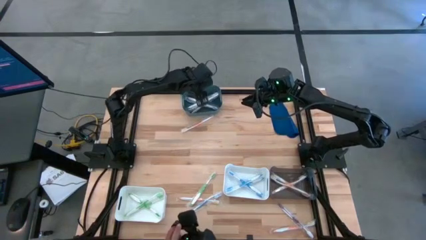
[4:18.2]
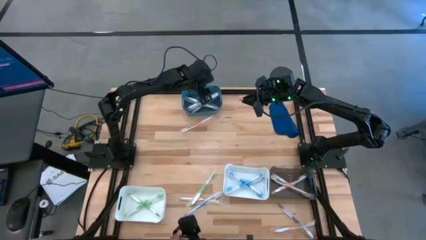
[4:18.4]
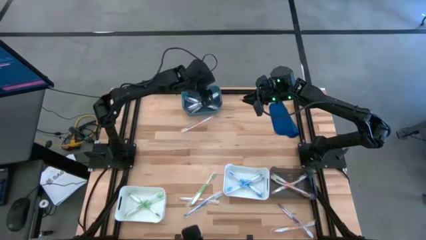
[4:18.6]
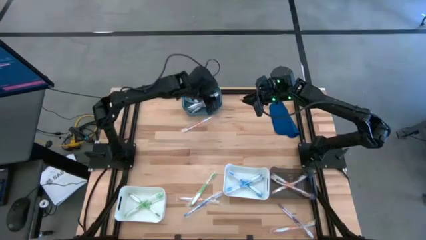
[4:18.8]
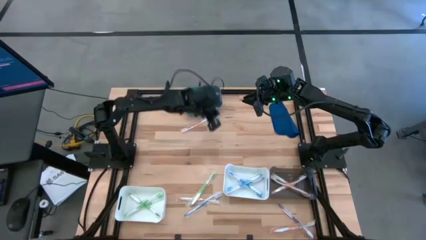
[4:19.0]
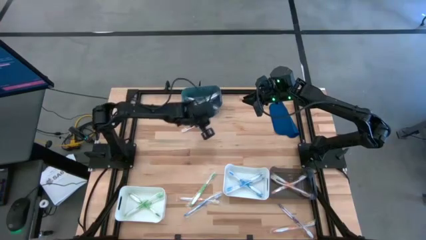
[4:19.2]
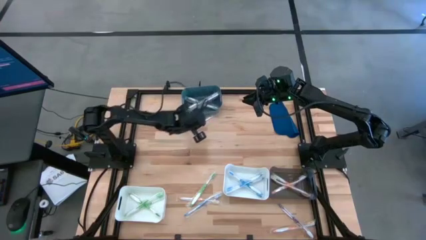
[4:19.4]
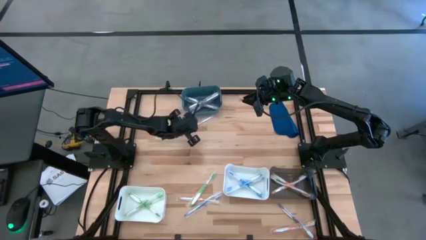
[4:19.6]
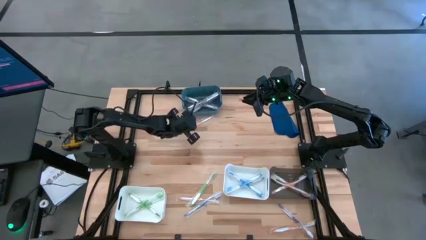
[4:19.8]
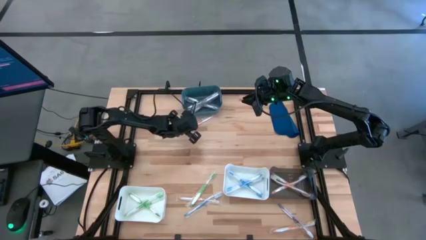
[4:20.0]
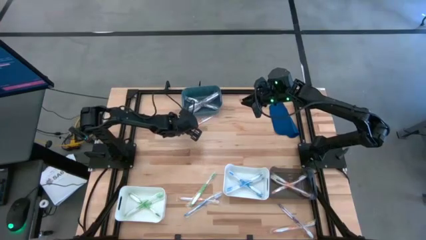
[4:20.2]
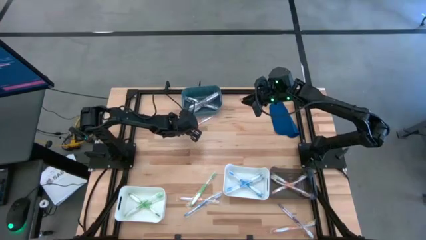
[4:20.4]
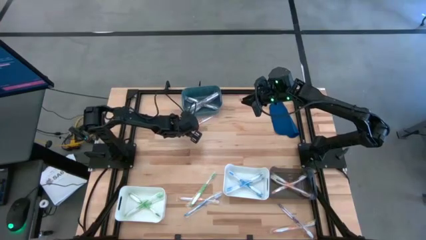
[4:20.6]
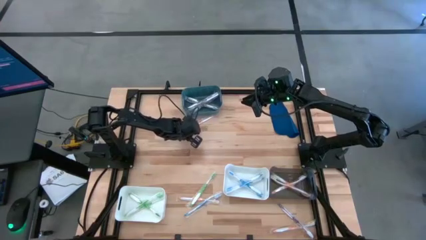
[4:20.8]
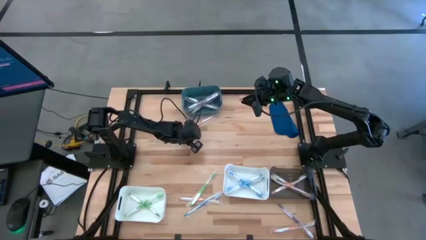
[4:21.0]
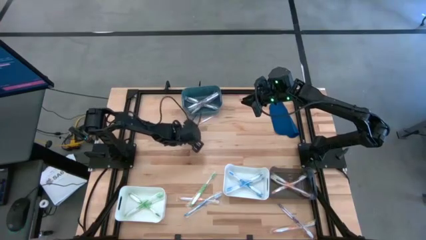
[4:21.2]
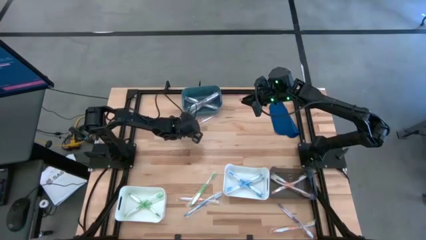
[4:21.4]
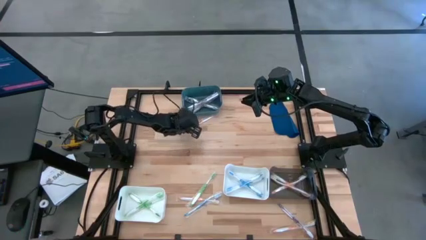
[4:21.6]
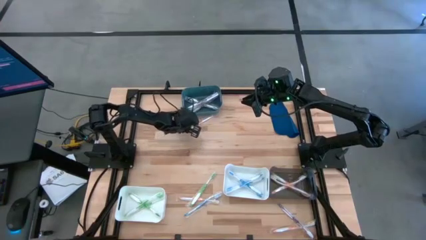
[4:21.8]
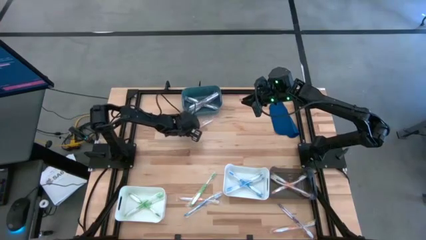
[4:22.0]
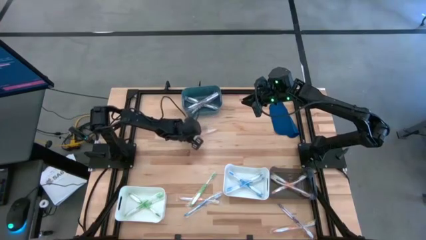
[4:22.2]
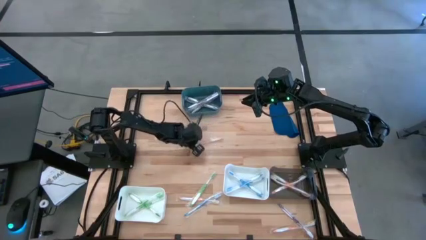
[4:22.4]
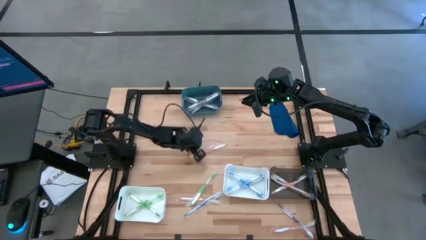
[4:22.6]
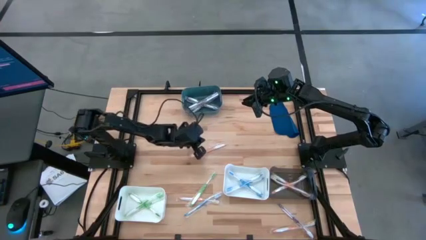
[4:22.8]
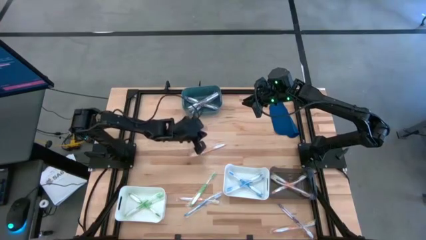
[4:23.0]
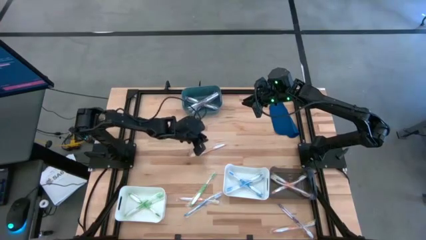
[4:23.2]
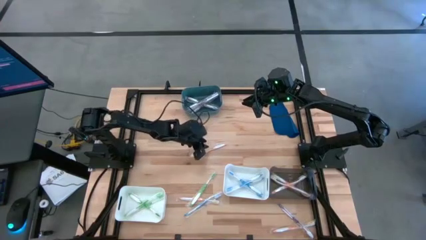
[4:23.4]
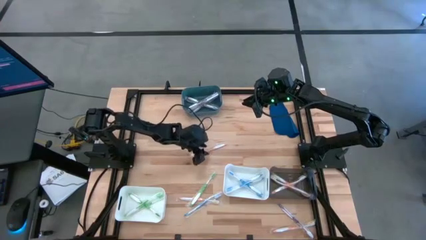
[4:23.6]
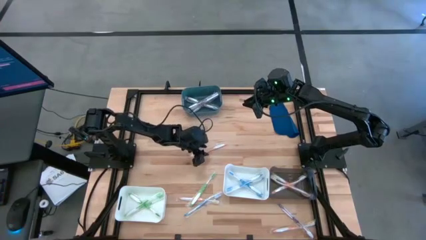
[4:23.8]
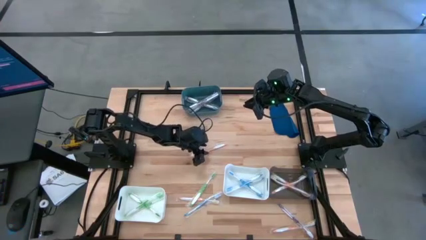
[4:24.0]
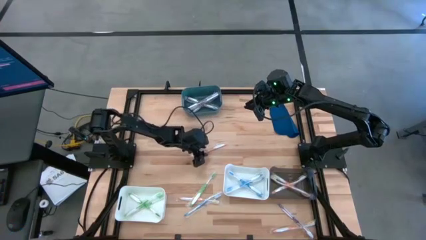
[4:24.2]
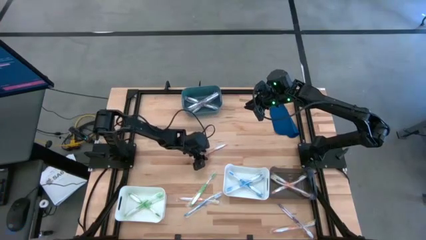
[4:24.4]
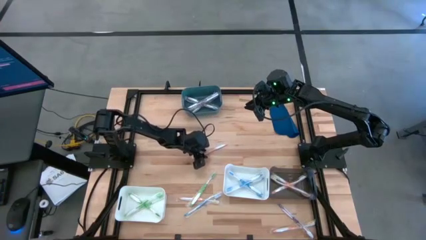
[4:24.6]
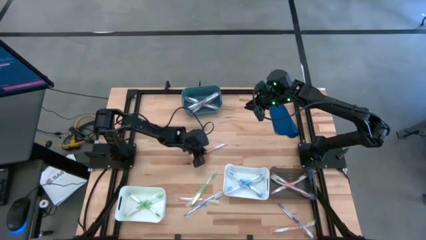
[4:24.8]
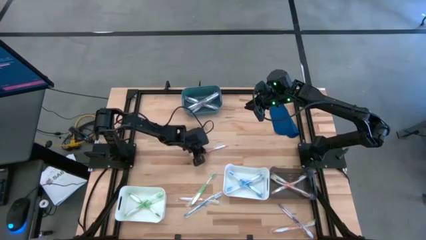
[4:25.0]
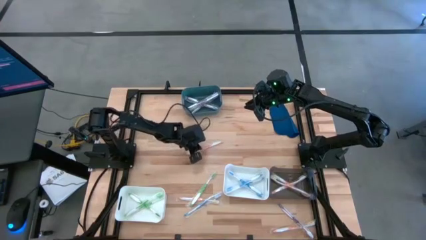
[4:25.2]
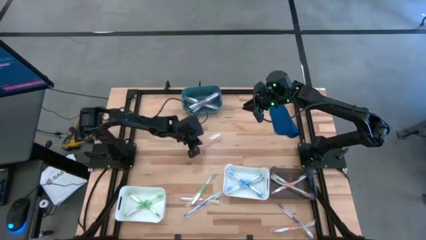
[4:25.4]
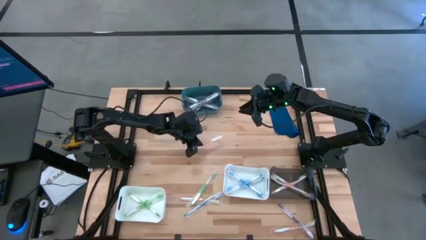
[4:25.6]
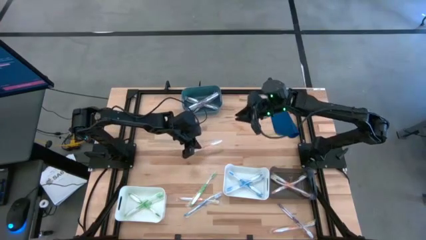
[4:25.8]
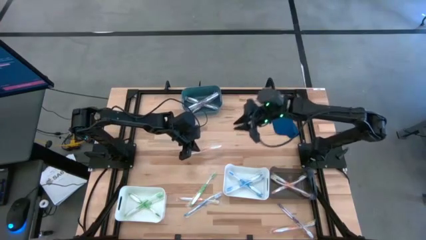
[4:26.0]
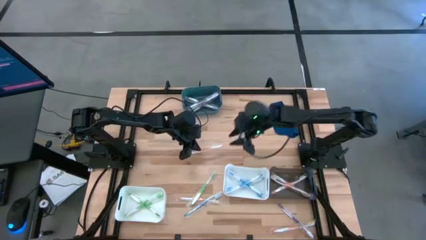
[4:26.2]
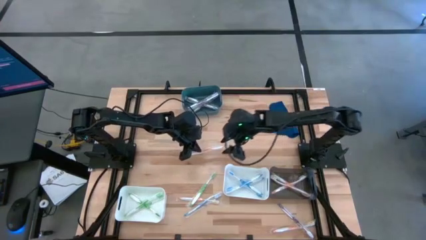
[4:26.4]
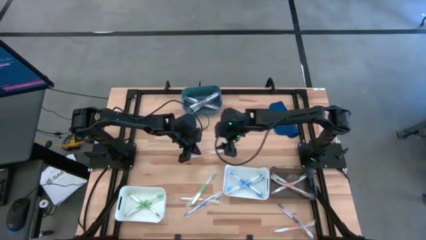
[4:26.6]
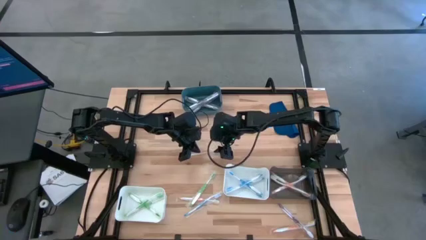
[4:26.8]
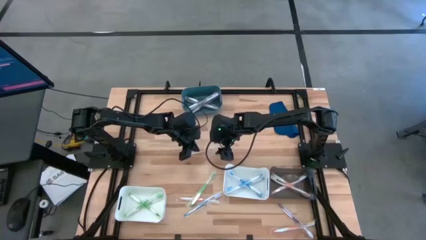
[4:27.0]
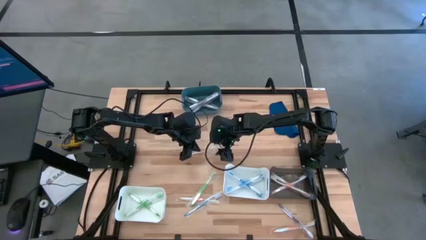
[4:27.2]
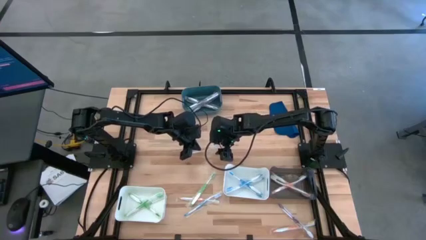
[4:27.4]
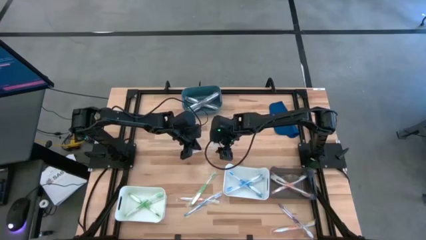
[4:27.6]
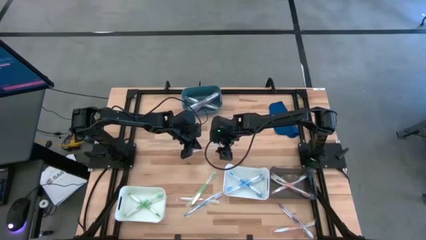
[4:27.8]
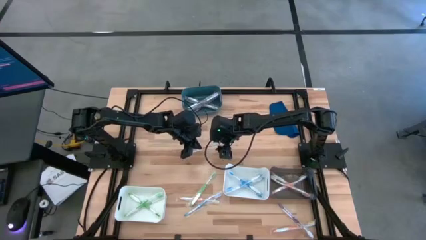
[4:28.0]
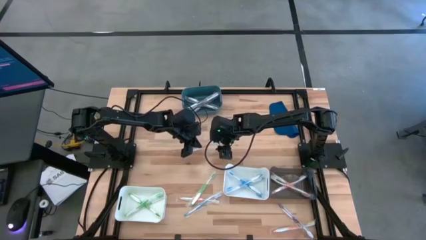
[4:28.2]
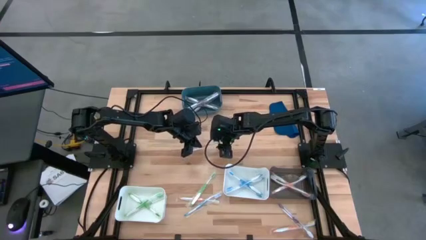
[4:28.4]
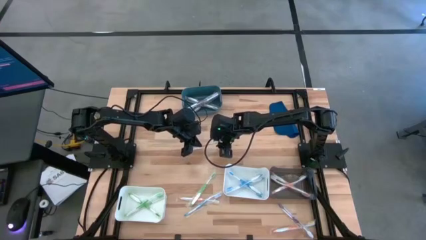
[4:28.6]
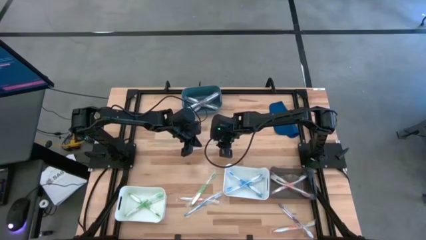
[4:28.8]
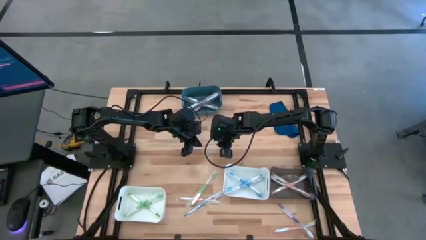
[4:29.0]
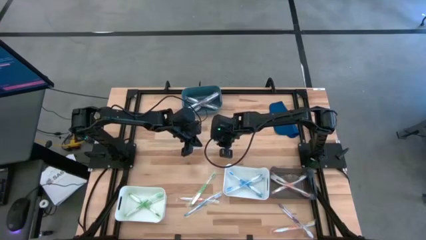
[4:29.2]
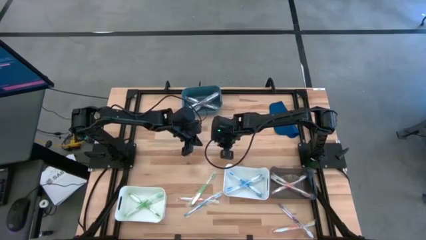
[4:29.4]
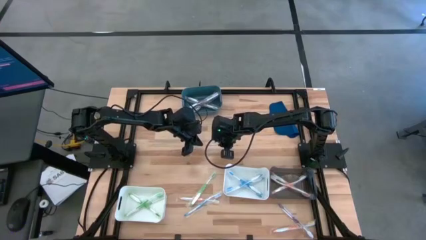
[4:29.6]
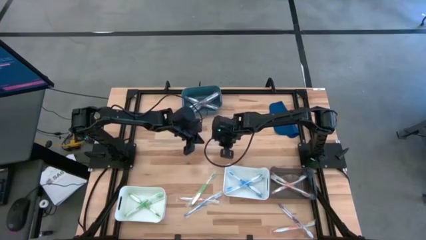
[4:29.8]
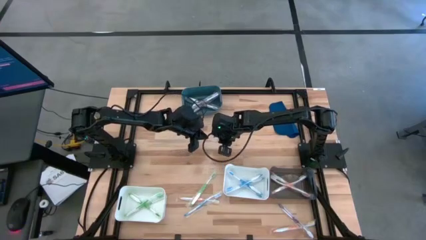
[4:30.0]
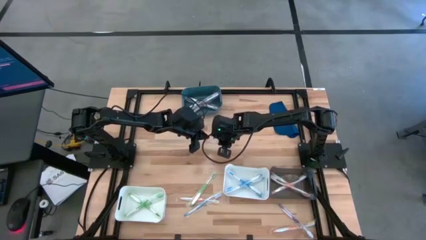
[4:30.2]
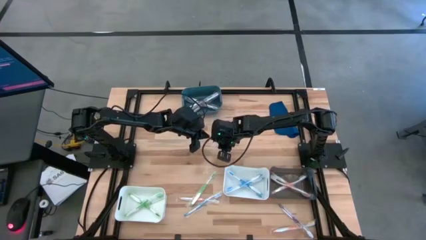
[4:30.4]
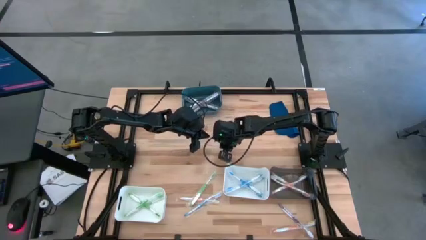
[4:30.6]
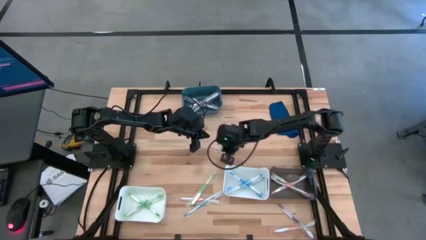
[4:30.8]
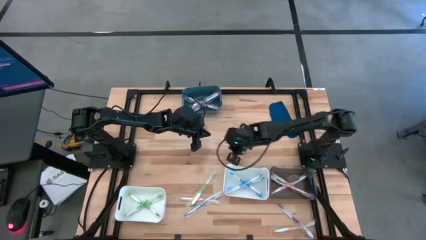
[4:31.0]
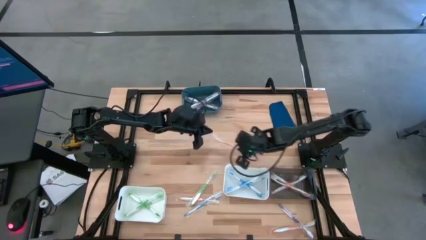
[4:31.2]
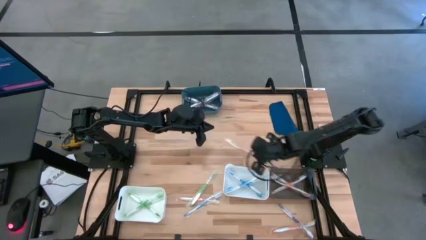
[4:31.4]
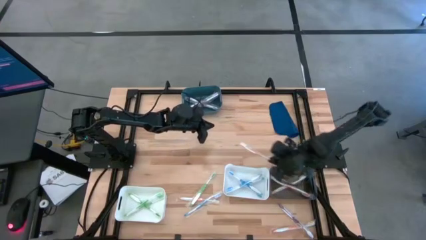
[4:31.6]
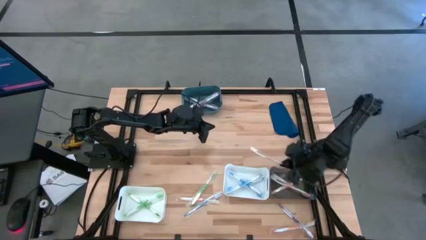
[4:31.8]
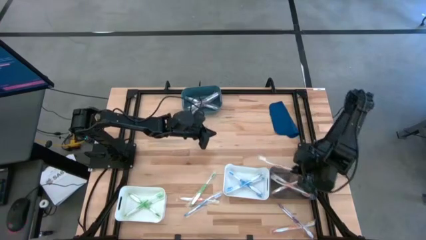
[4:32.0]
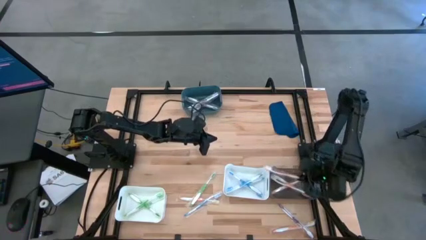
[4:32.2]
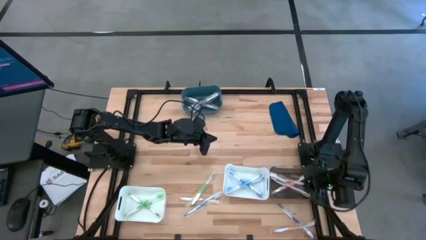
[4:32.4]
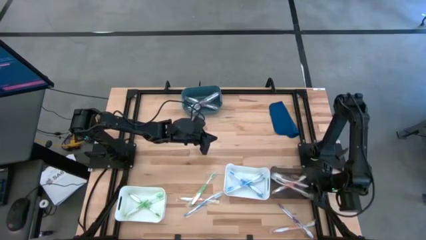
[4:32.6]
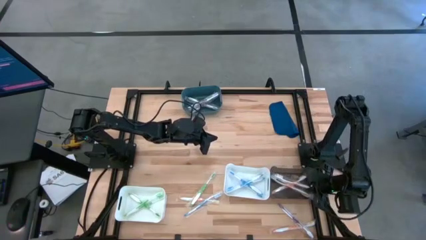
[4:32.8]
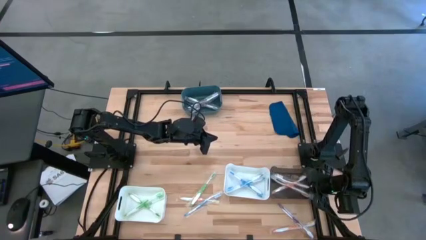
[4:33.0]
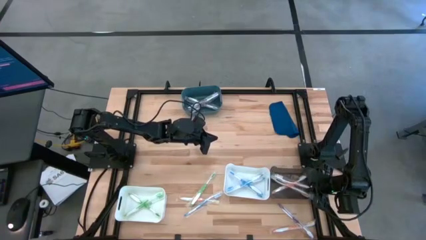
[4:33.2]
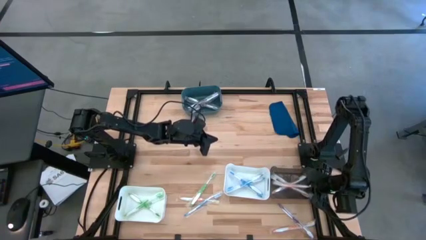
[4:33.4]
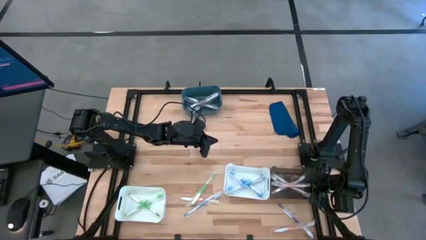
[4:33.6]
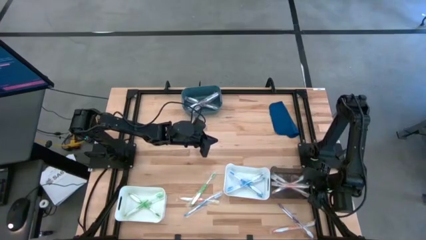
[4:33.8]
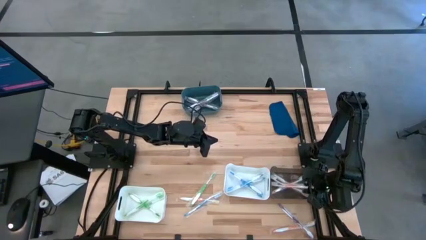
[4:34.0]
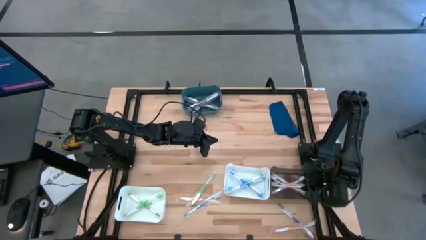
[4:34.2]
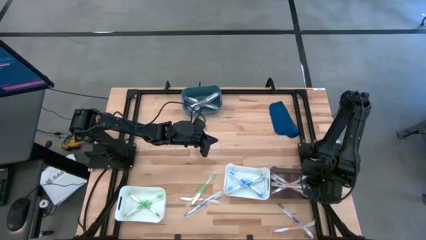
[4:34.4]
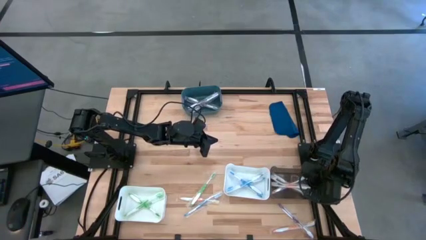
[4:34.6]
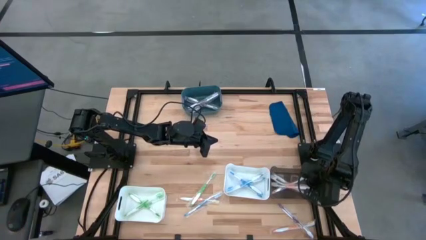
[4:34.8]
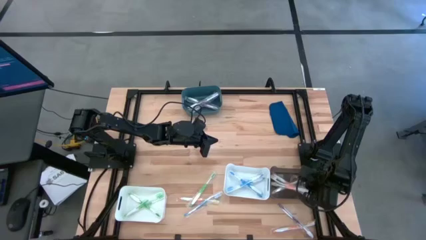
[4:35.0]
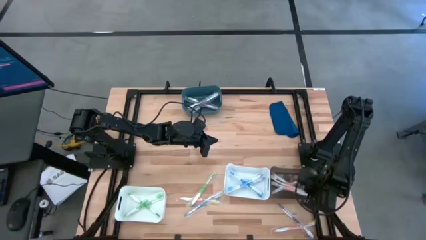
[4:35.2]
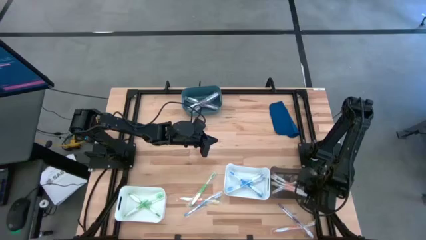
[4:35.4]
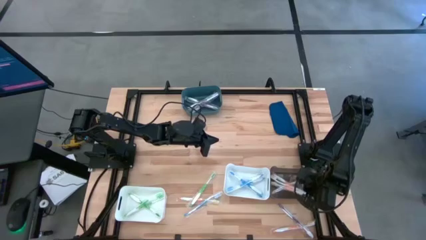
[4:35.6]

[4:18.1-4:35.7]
Task: Pick & Place Toothbrushes
Put the orange toothbrush into the black bin
